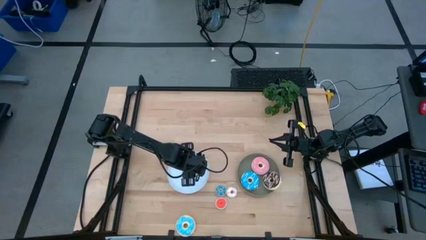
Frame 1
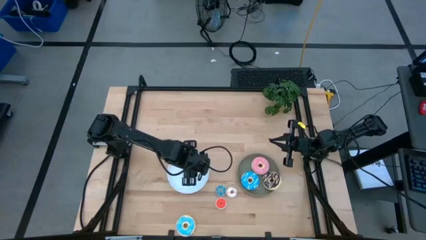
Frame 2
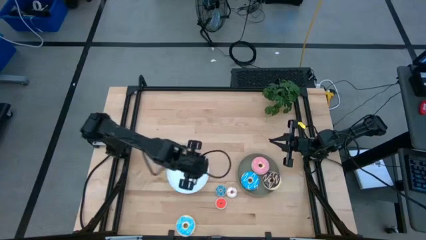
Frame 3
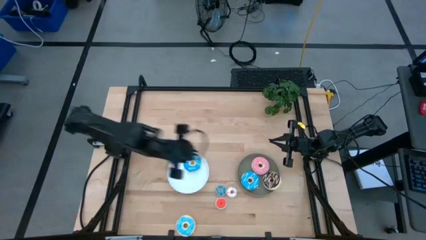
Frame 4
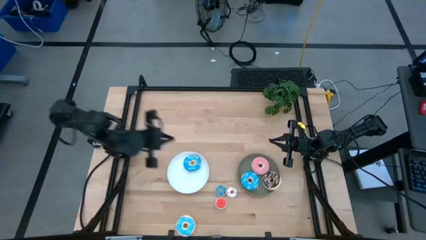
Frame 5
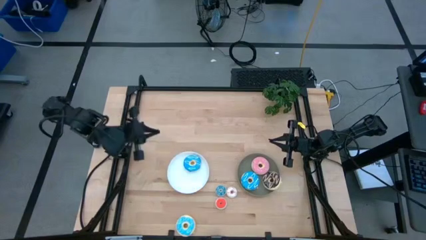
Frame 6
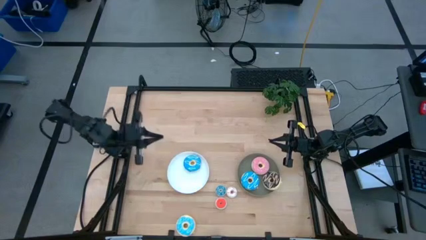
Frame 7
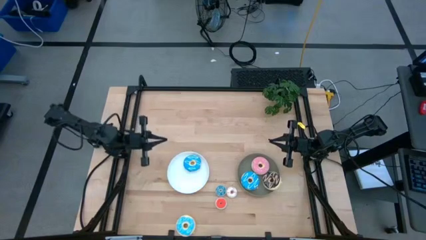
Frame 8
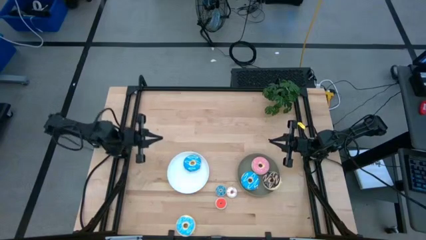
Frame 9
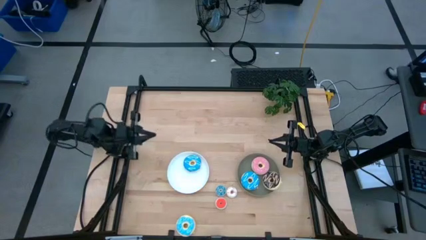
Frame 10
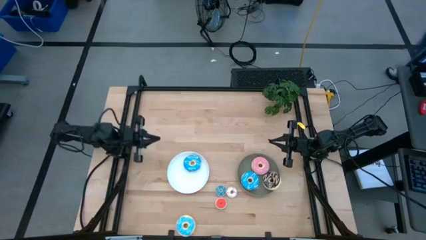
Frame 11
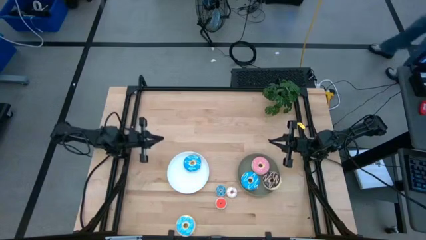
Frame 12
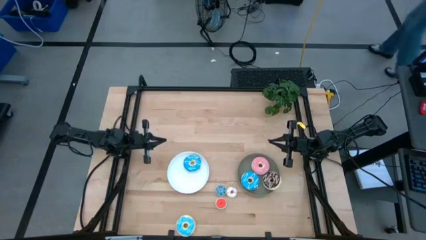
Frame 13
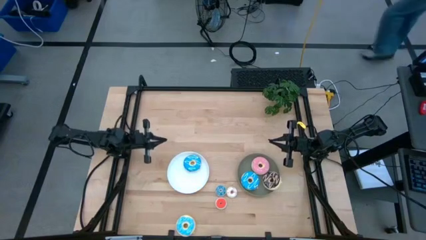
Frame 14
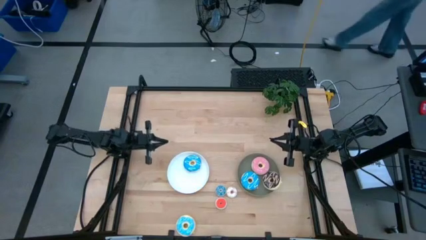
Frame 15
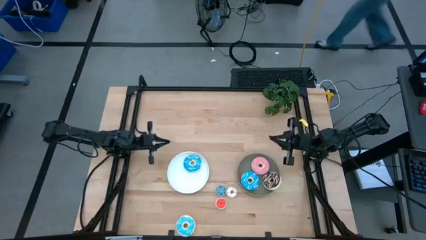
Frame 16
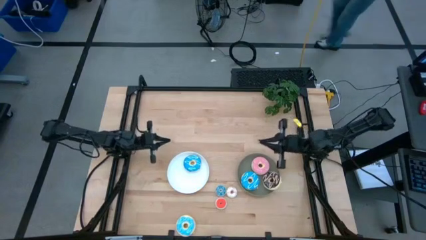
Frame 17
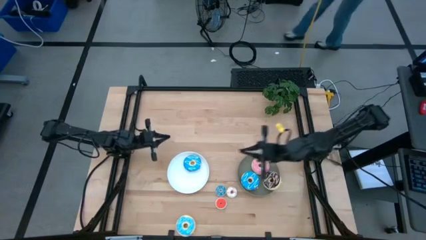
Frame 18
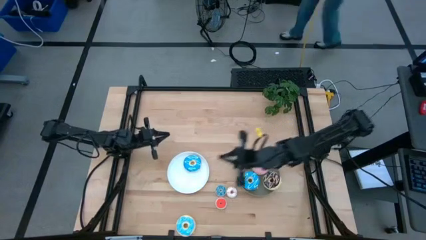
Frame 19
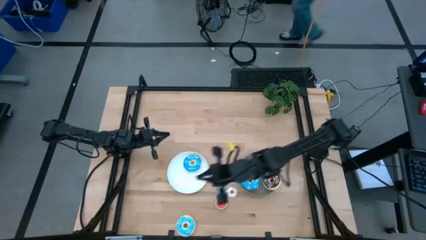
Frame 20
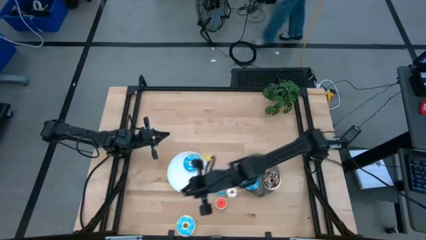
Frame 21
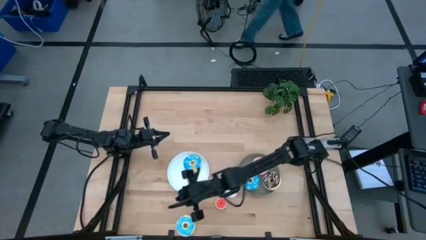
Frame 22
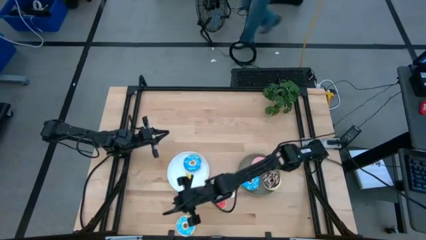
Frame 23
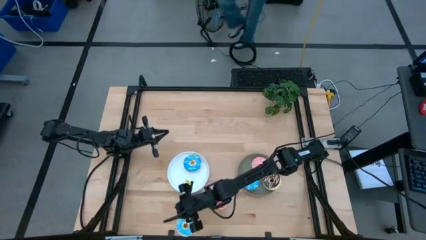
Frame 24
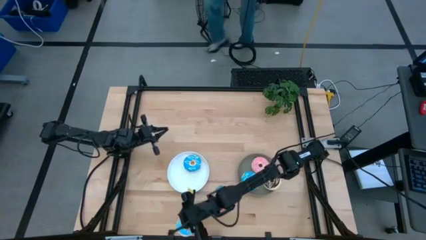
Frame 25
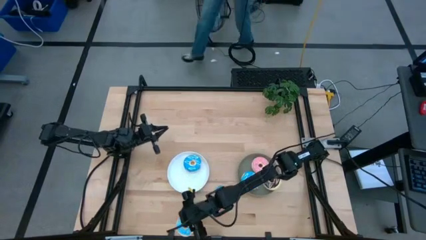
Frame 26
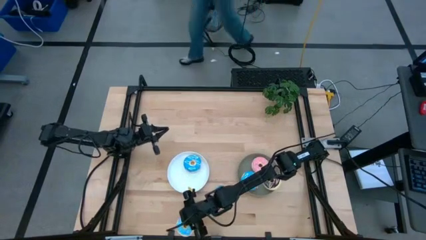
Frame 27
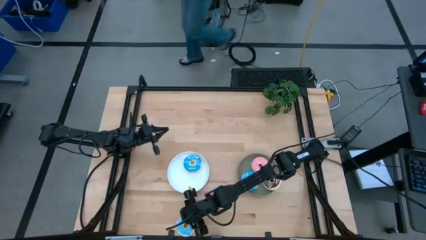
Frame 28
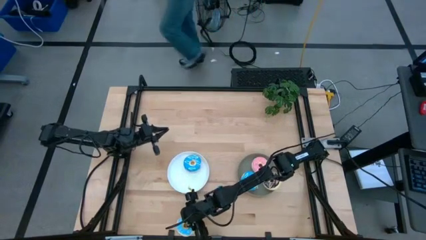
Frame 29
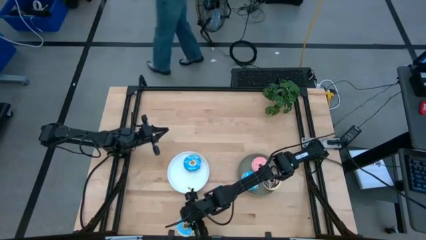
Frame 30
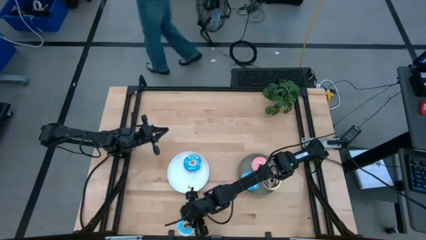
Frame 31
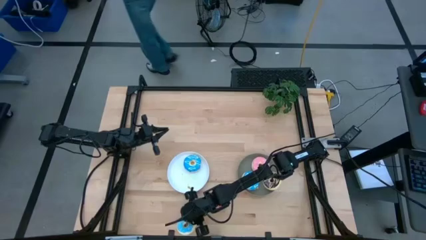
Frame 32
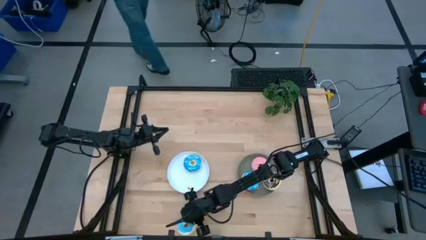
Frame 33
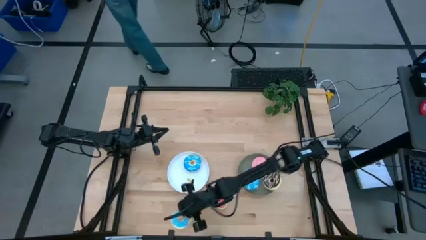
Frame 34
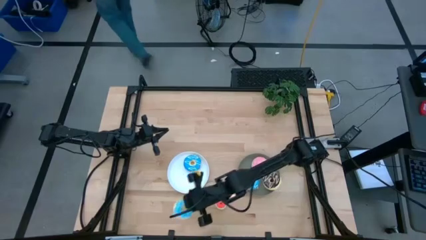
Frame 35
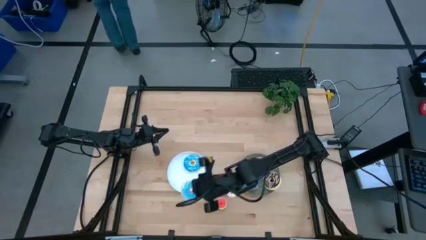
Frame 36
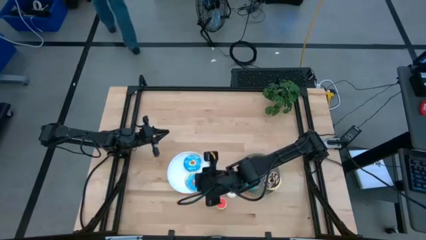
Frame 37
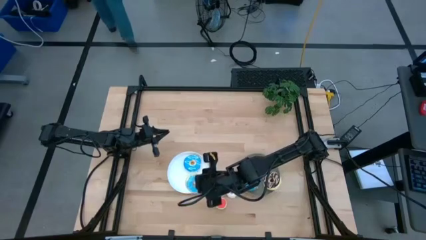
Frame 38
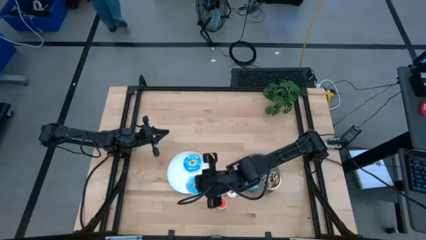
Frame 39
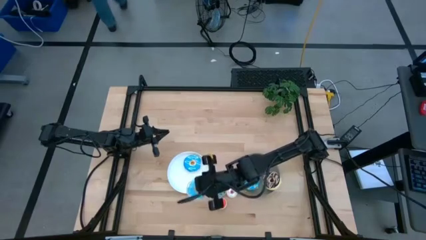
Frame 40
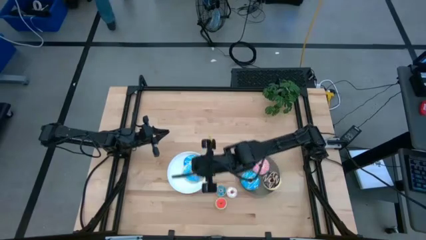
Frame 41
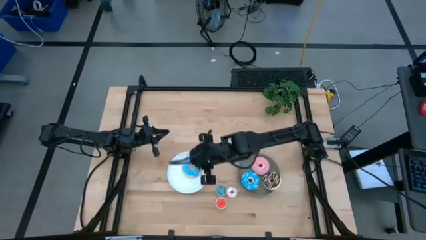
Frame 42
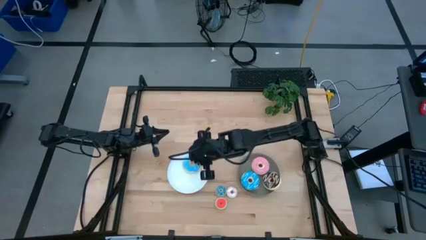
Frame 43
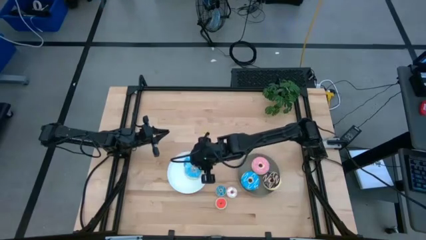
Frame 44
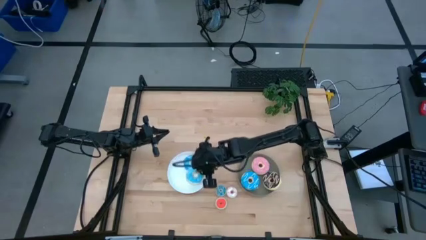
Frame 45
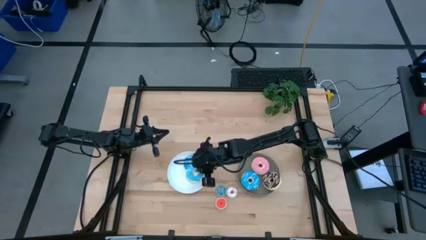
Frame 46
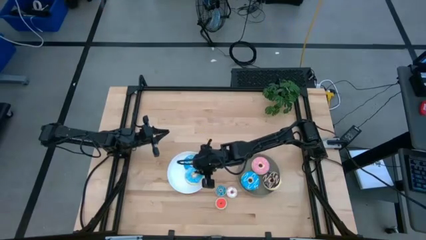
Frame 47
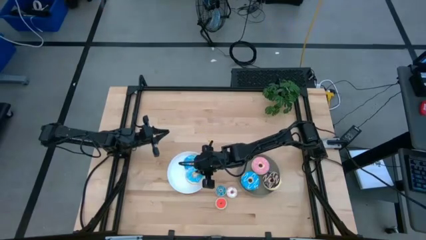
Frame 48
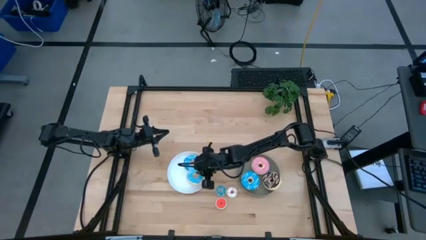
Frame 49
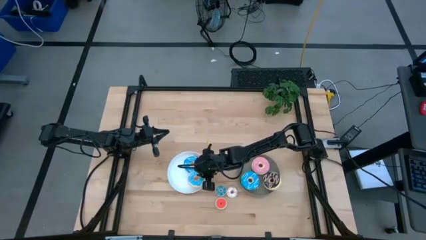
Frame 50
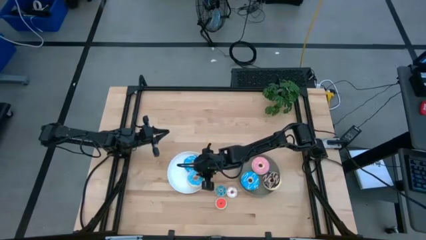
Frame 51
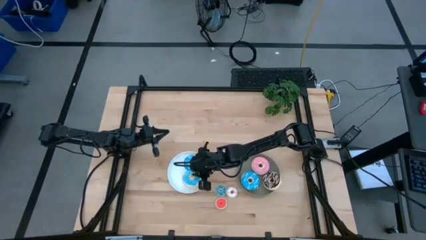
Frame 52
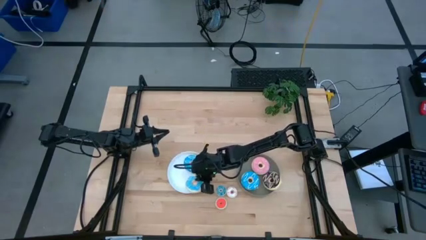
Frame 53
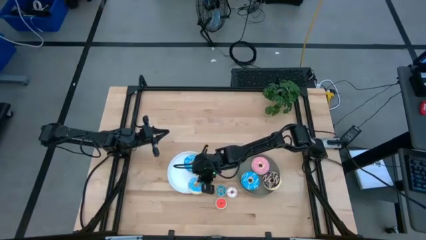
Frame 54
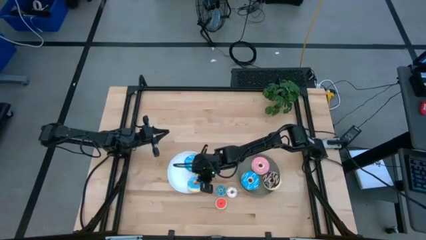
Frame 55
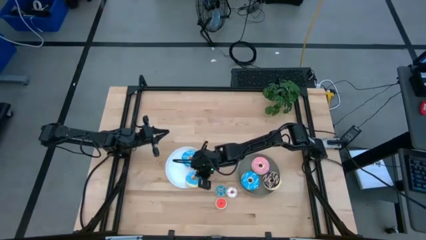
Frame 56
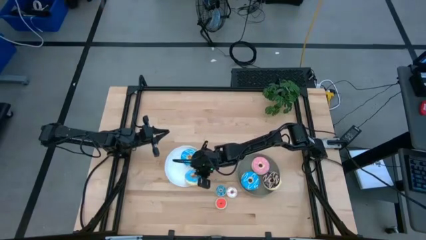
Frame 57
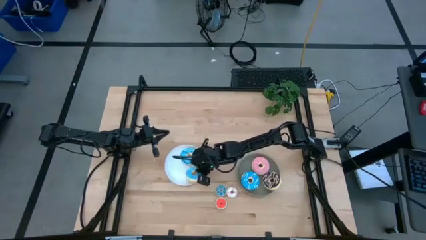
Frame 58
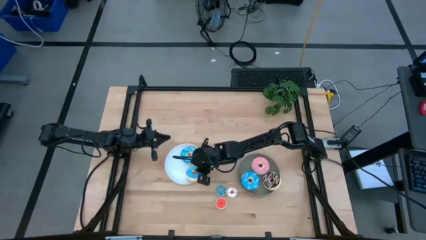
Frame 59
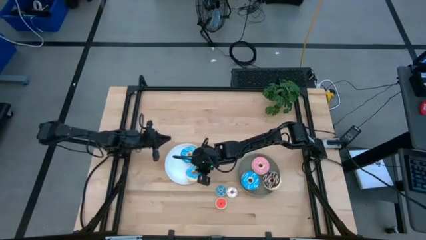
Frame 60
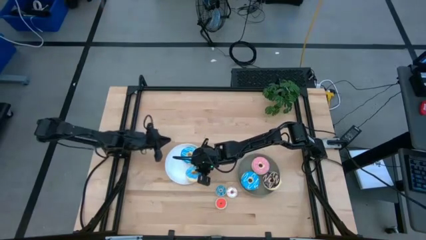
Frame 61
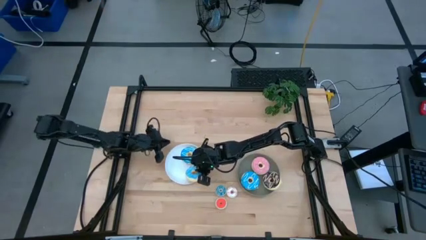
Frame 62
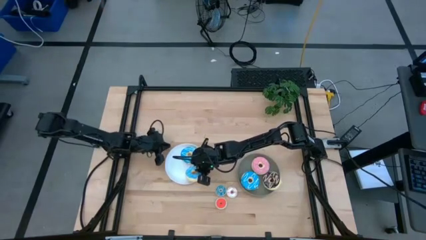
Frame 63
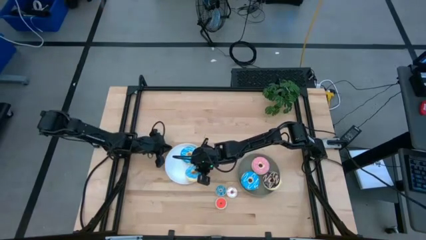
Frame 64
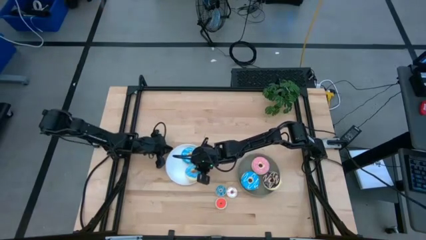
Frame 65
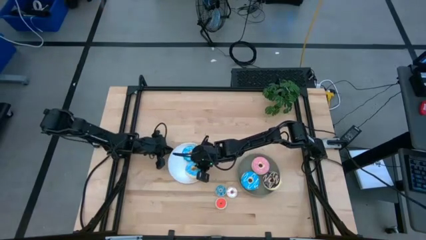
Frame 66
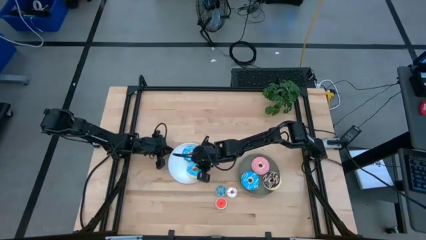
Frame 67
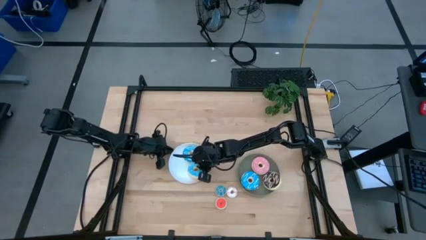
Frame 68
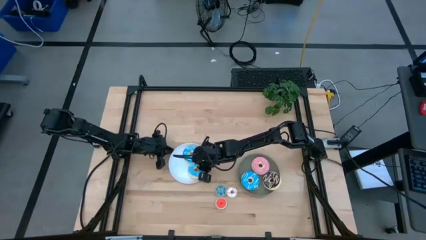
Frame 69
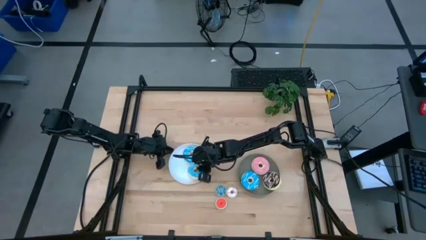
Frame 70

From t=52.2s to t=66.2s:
Task: Pick & Place donuts
Put the large light blue donut on the white plate

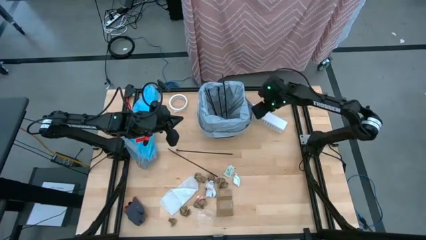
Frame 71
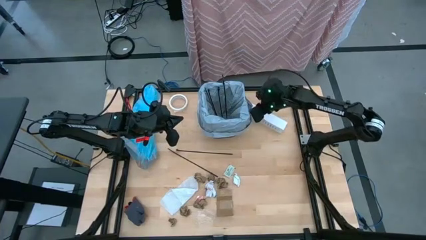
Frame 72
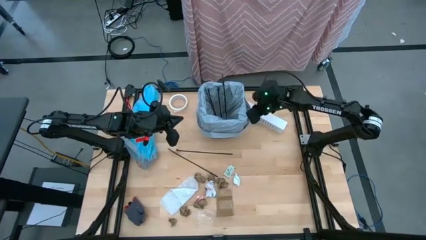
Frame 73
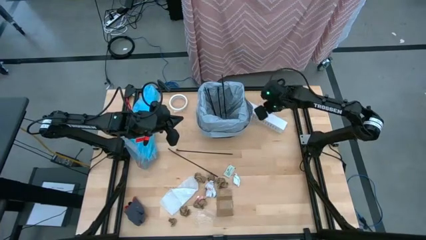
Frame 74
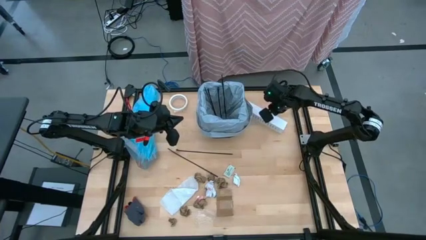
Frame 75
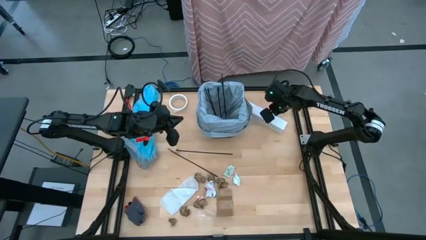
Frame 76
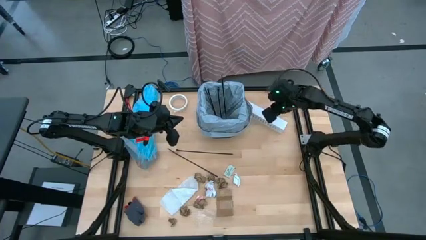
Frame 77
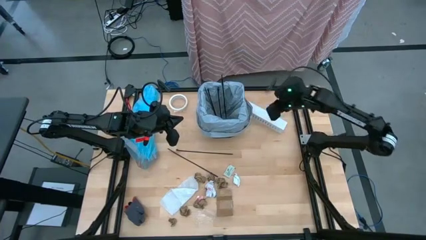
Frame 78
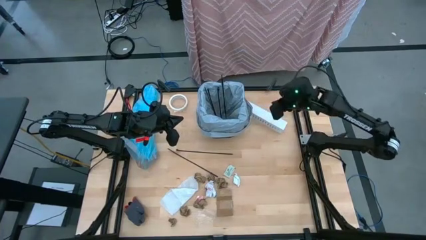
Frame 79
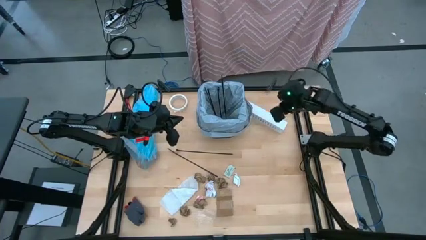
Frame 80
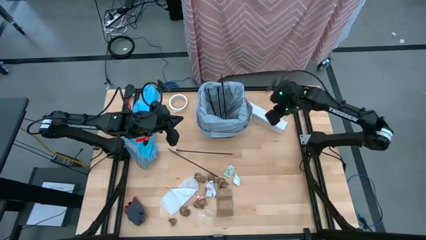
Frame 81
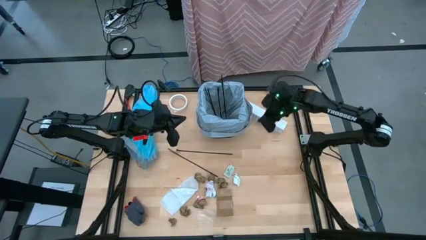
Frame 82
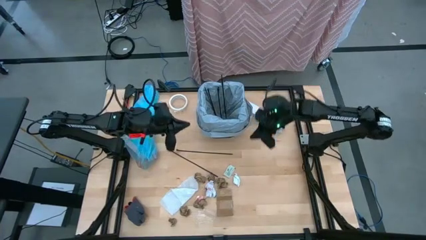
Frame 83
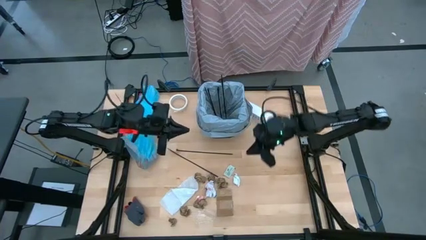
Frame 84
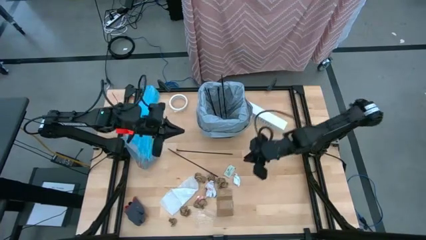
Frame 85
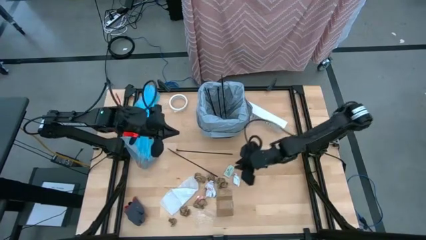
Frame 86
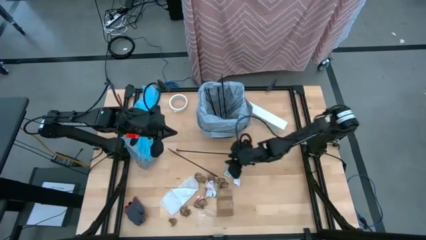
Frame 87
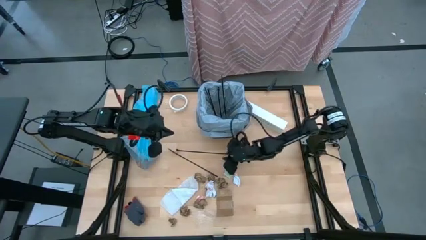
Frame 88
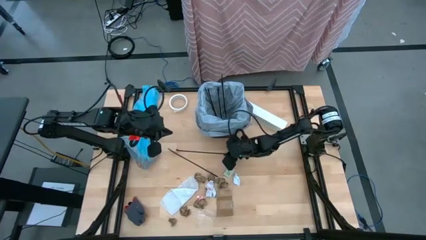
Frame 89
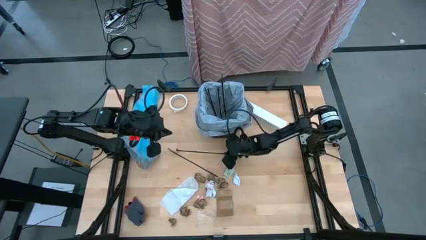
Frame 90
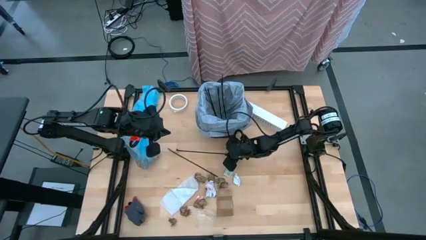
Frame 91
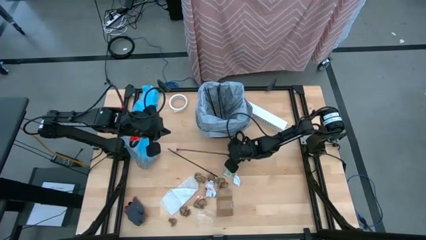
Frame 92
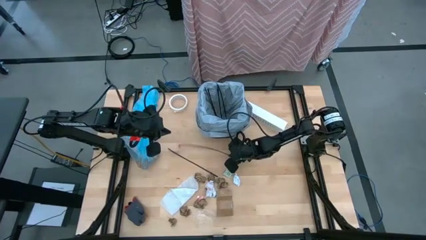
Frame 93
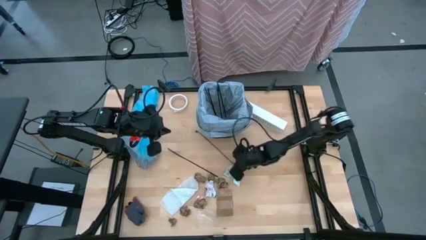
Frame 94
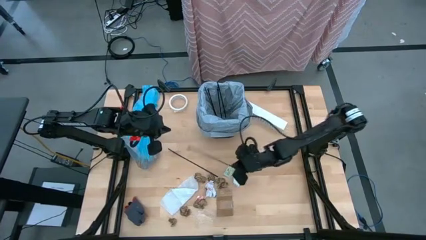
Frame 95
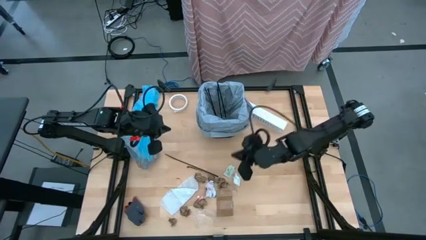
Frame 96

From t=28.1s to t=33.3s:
Task: place trash/remove bag and relplace
Put the zip tie into the trash bin
